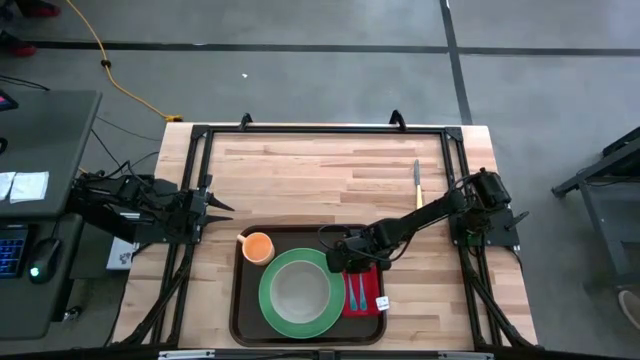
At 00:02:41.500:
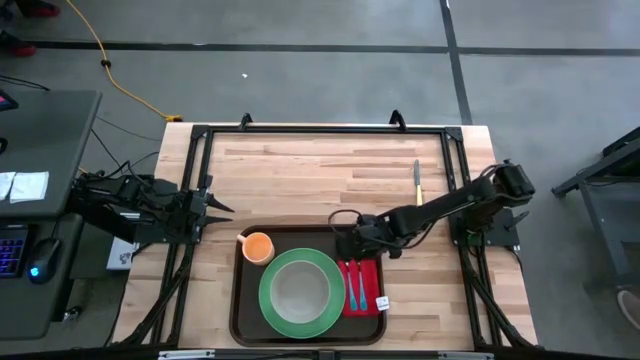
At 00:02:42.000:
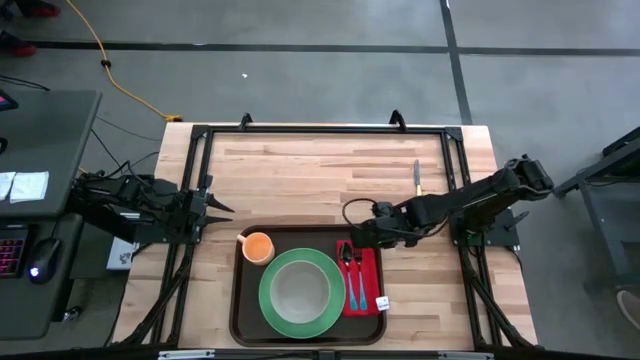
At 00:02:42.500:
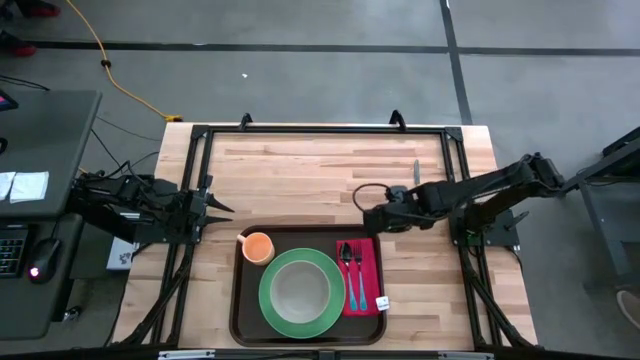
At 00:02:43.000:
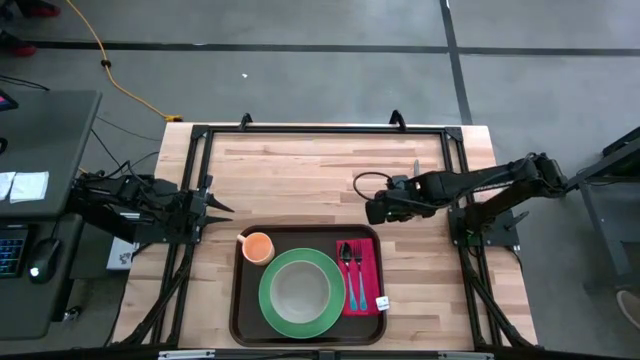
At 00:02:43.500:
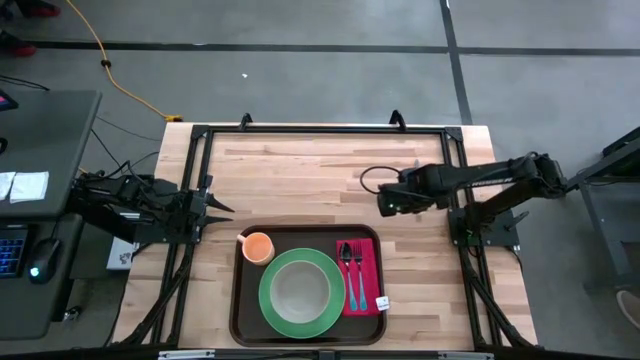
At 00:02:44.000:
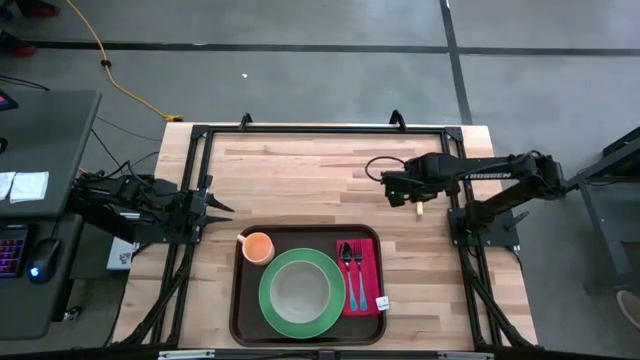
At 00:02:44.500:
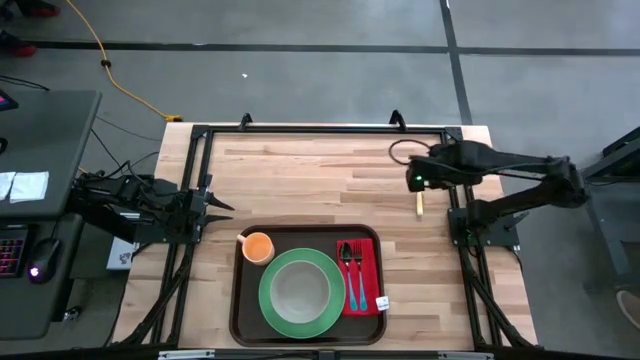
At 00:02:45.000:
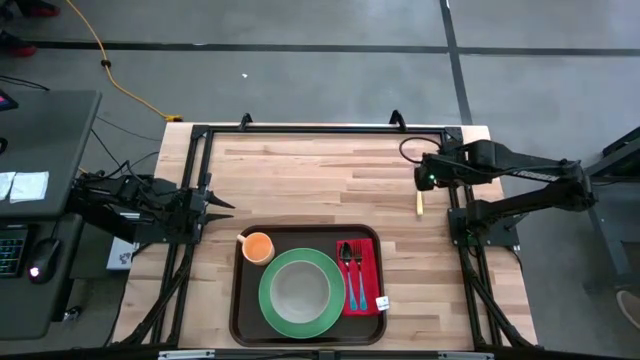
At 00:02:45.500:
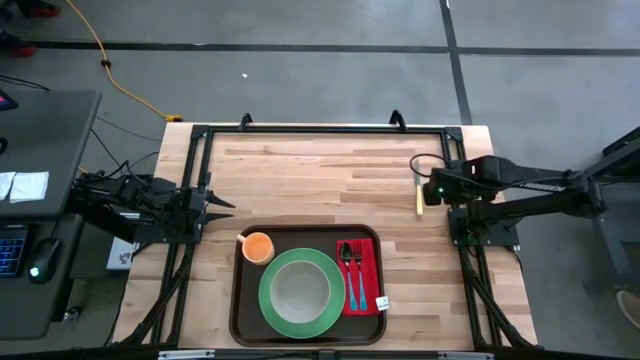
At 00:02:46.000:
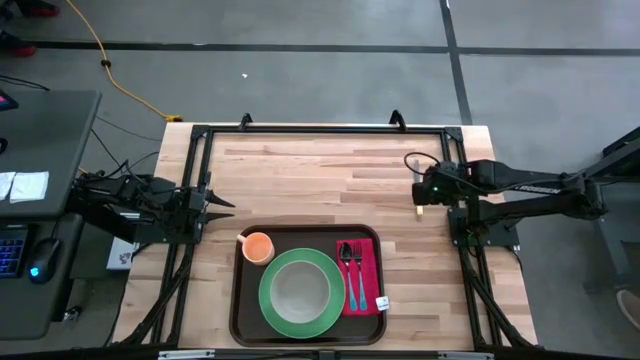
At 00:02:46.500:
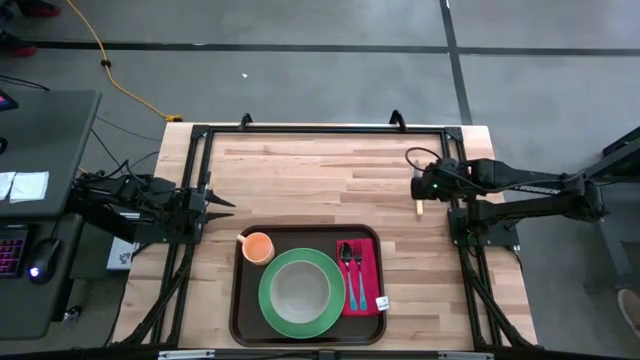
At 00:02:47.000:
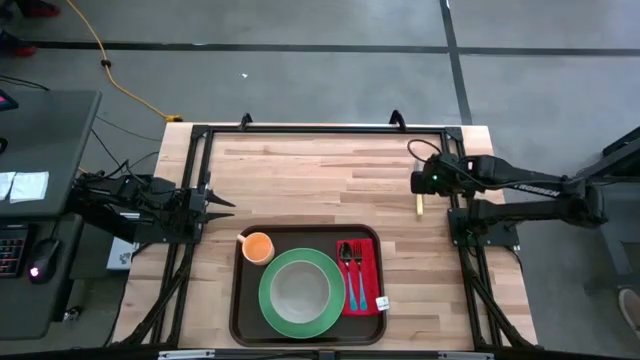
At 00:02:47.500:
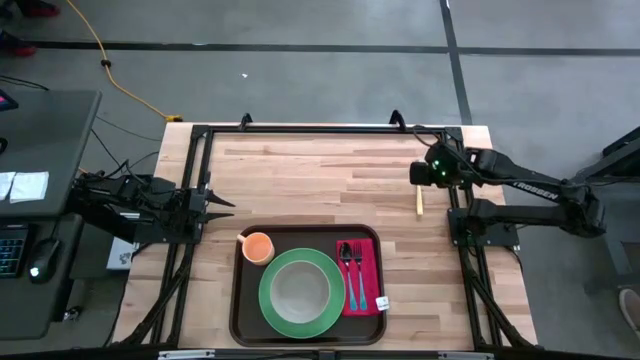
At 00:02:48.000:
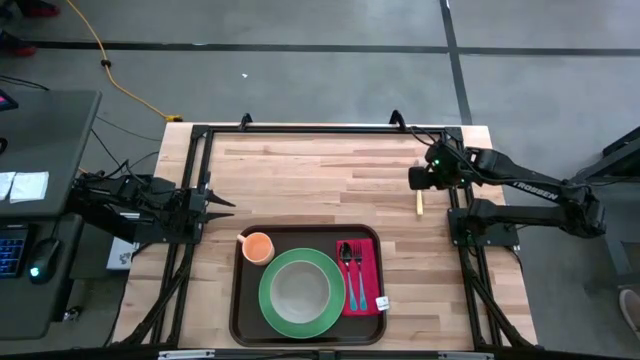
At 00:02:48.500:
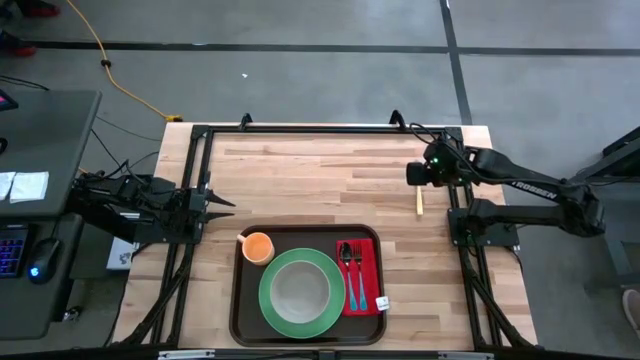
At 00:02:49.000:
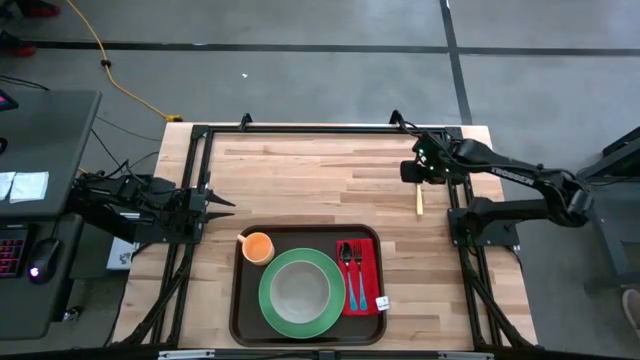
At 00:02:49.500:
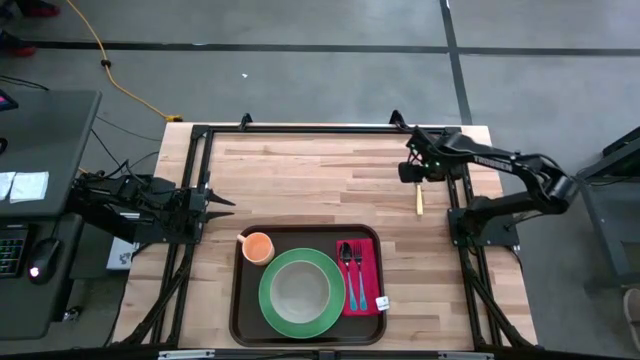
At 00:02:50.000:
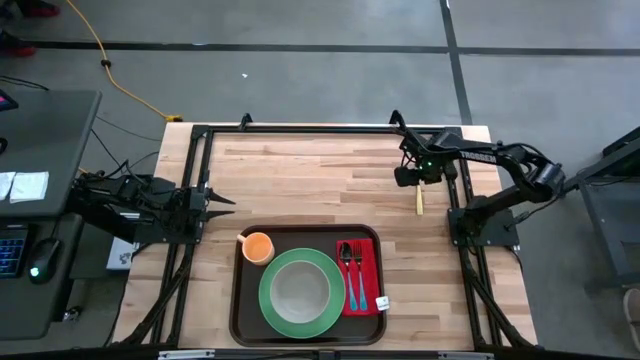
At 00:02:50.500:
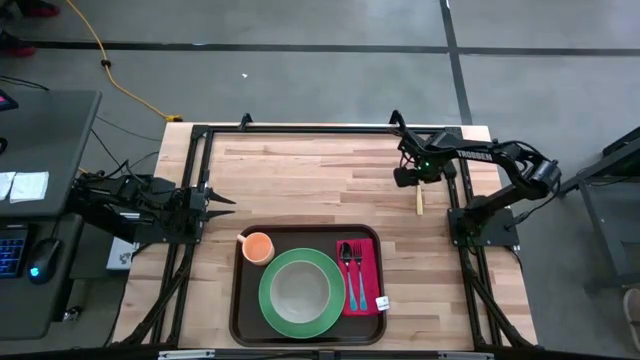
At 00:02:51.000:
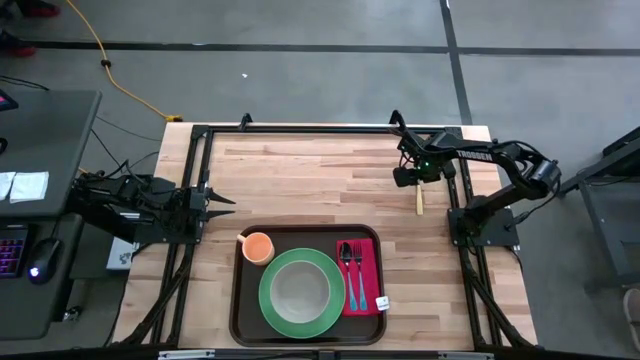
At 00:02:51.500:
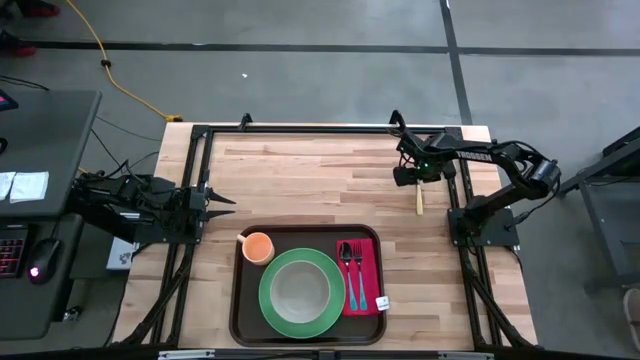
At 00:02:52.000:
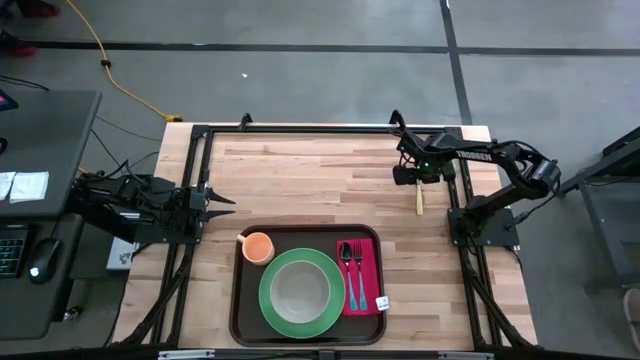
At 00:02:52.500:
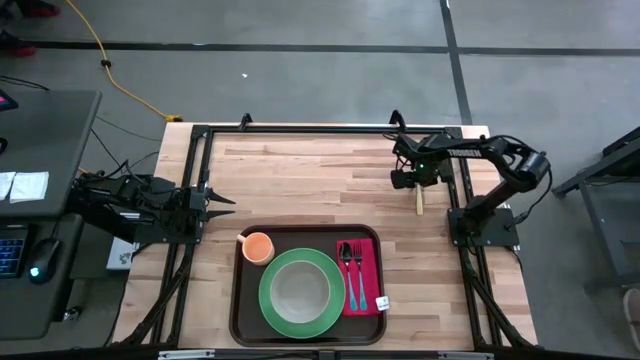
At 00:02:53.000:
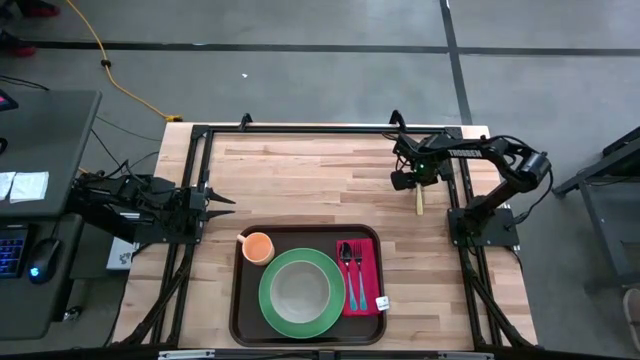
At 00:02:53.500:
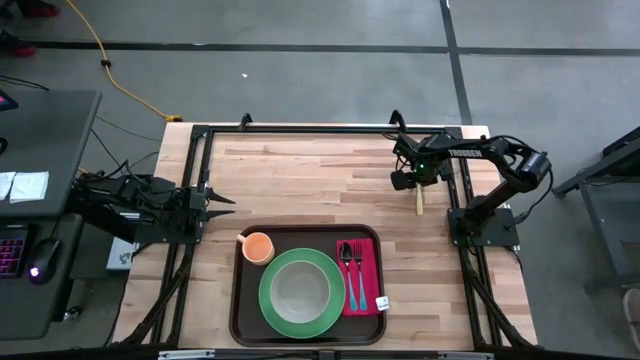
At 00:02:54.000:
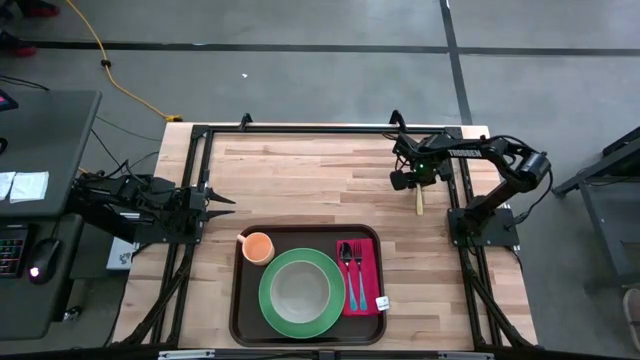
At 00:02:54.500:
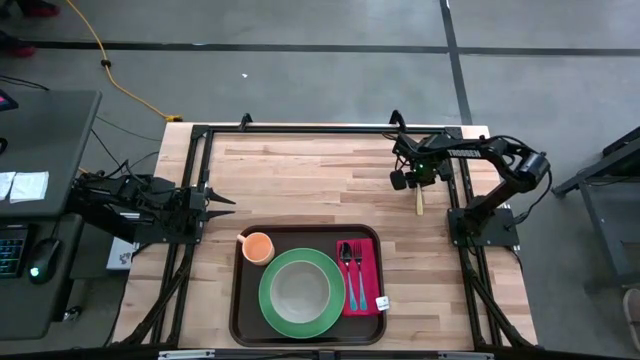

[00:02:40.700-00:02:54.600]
Task: Set up tray
Put the yellow knife on the red napkin

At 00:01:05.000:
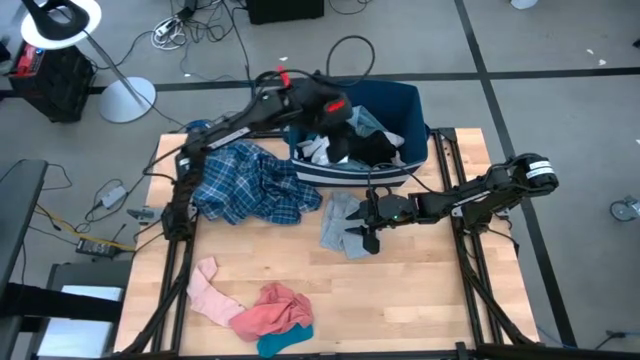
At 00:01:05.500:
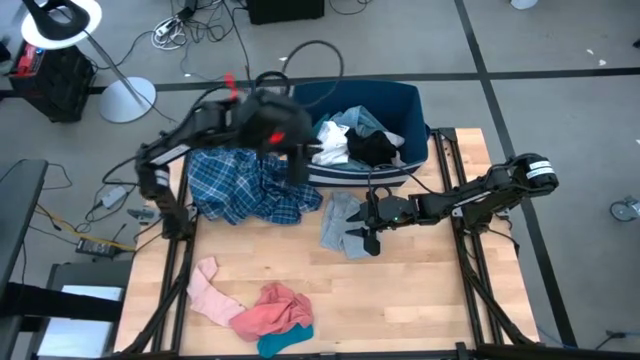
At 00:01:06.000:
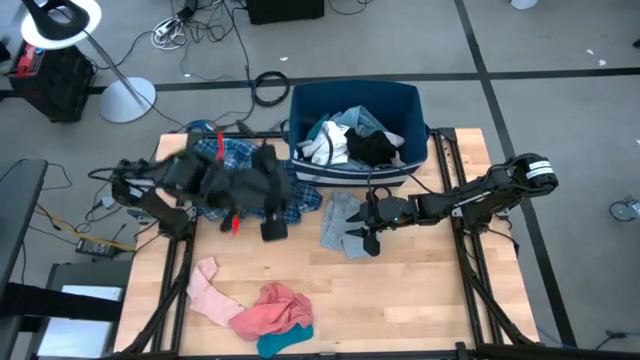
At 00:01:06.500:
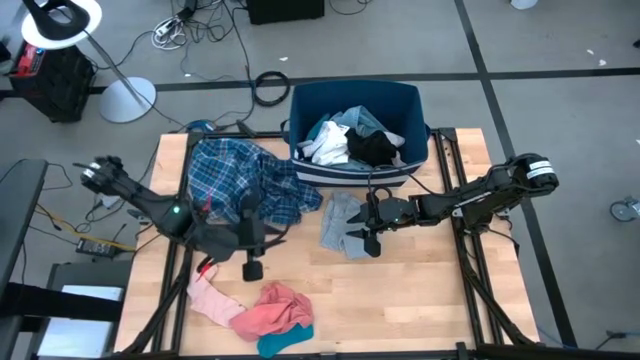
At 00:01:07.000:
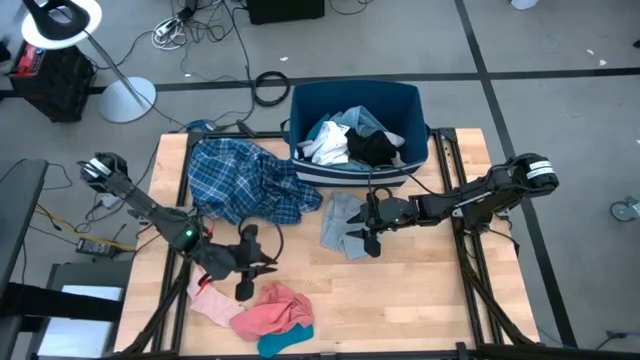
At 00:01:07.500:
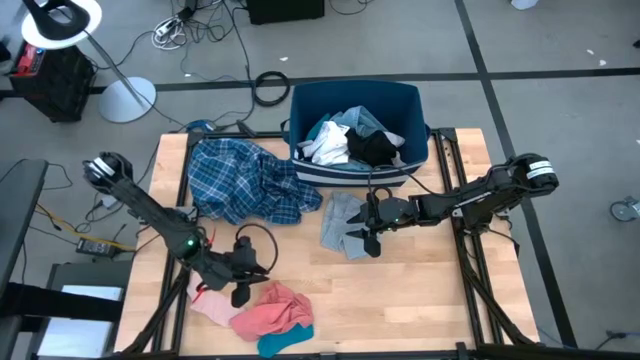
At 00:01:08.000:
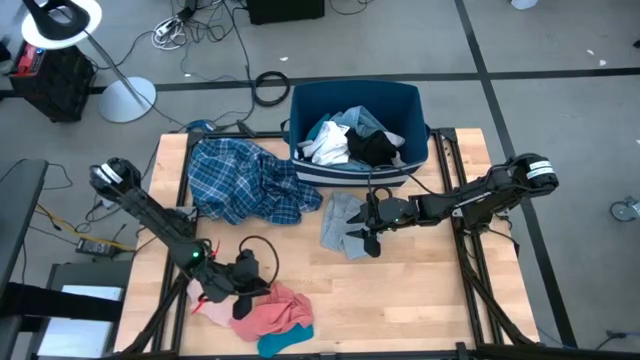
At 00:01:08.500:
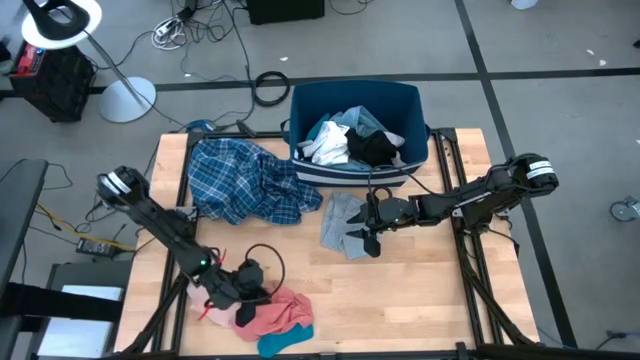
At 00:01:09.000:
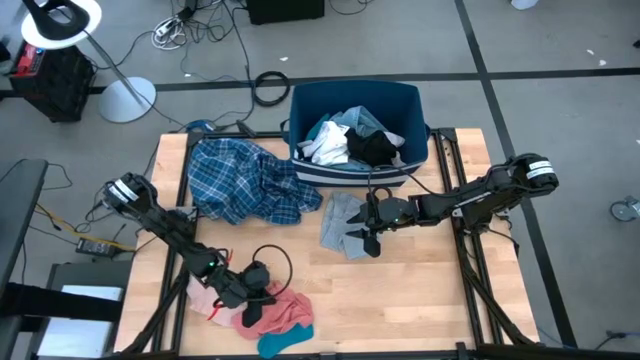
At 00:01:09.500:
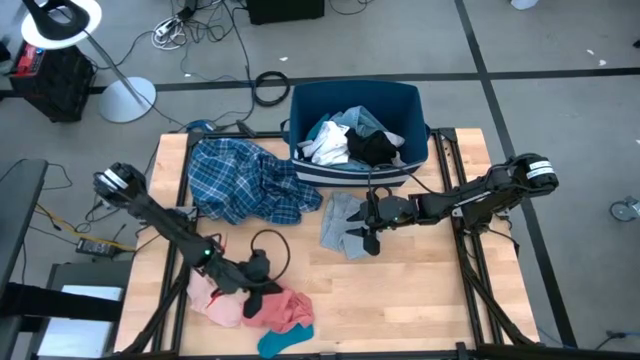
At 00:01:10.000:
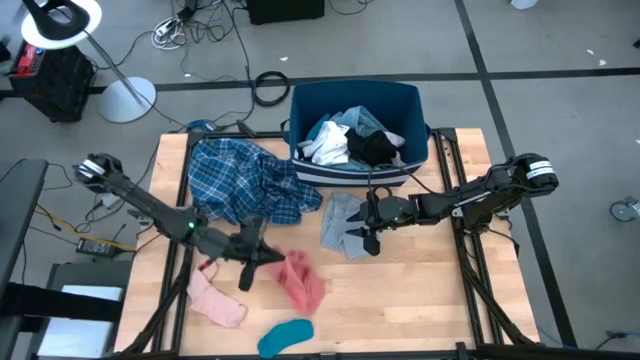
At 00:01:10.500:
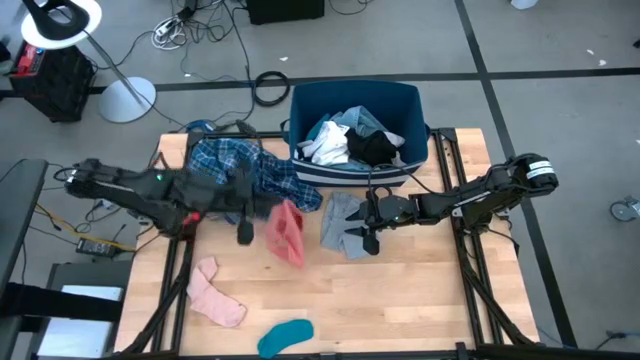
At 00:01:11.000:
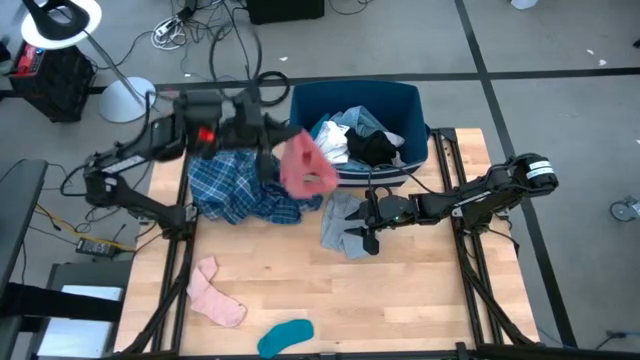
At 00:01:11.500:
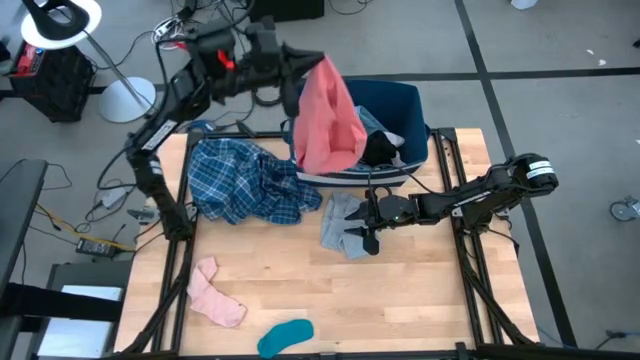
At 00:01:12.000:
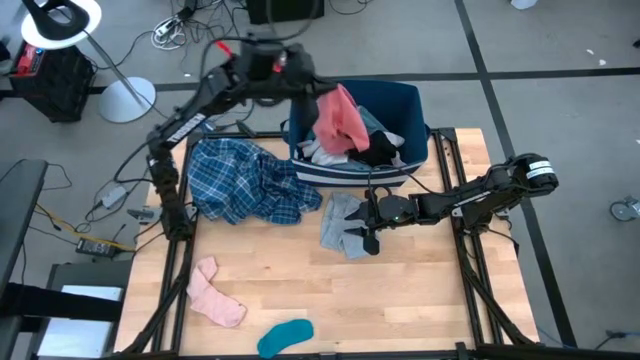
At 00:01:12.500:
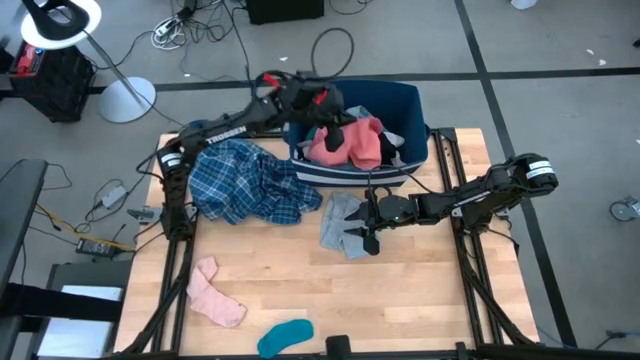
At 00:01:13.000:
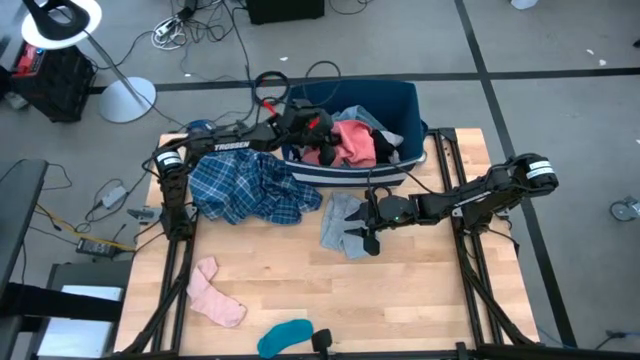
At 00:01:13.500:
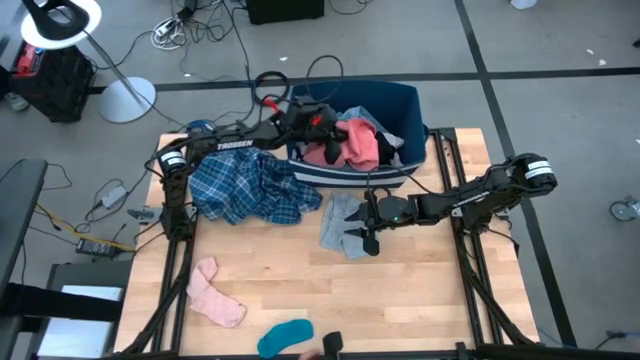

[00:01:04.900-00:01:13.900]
Task: Sort clothes
Put the pink underwear into the blue bin
